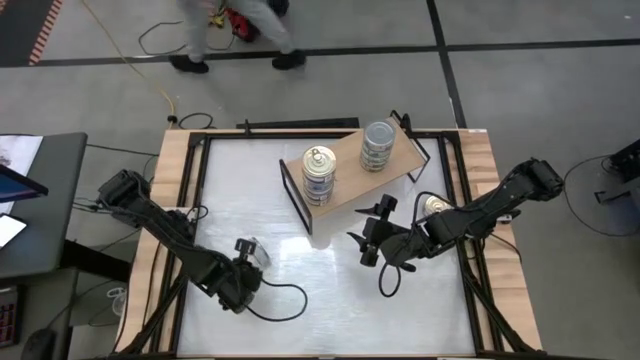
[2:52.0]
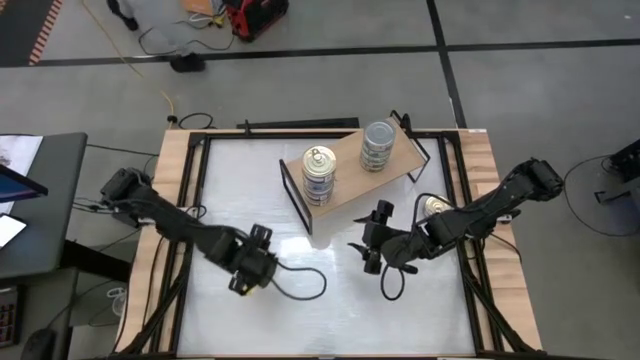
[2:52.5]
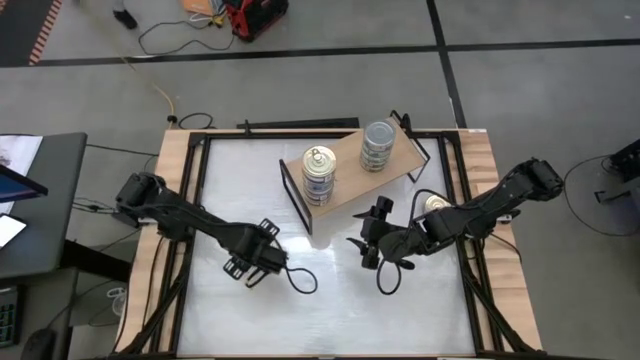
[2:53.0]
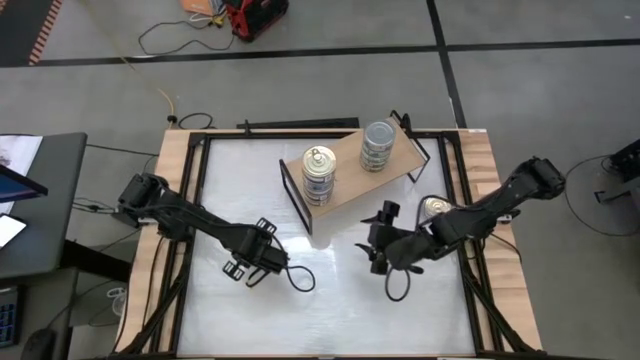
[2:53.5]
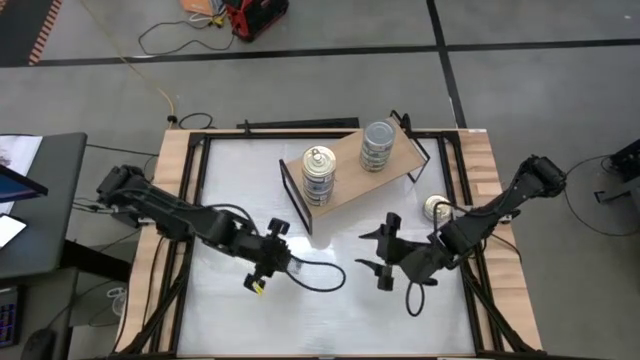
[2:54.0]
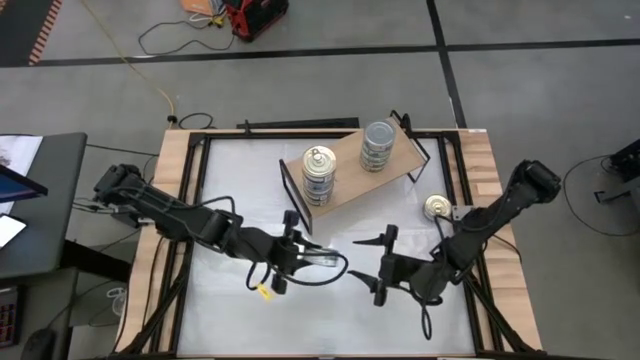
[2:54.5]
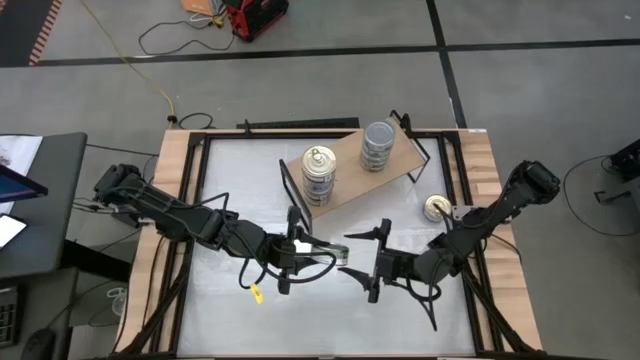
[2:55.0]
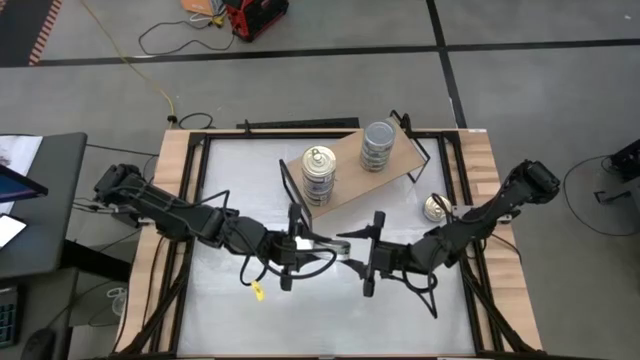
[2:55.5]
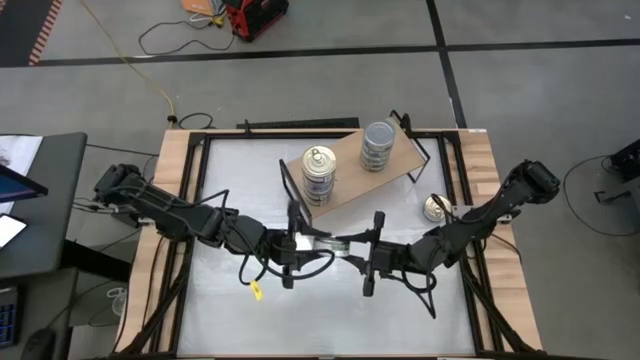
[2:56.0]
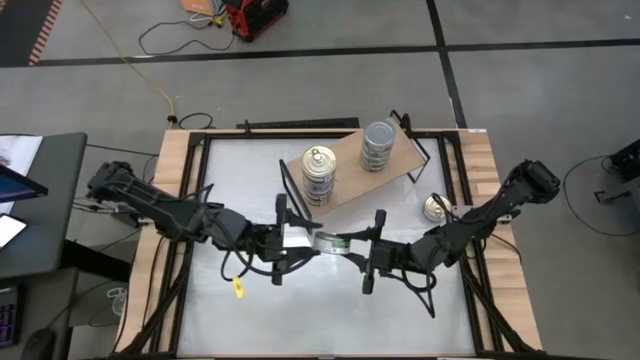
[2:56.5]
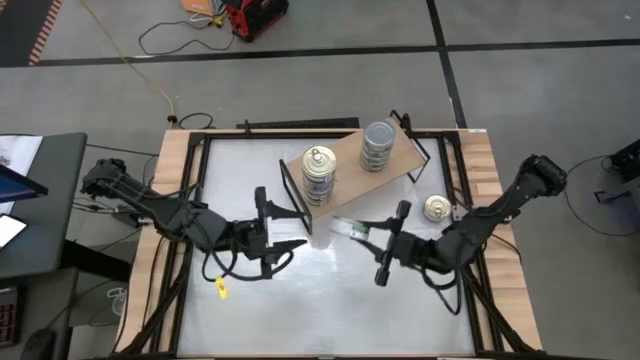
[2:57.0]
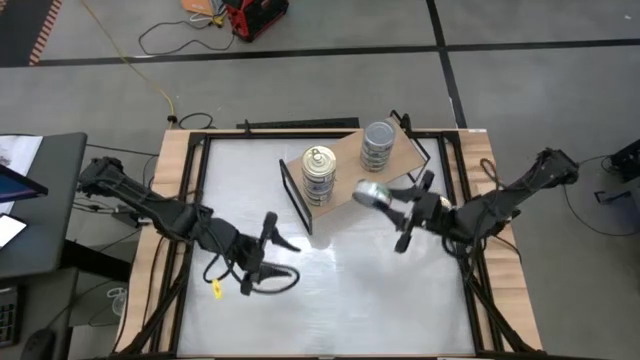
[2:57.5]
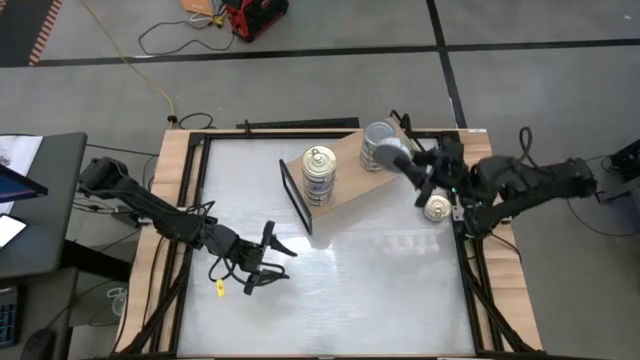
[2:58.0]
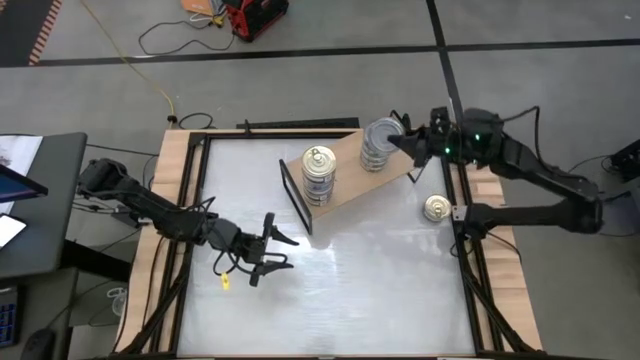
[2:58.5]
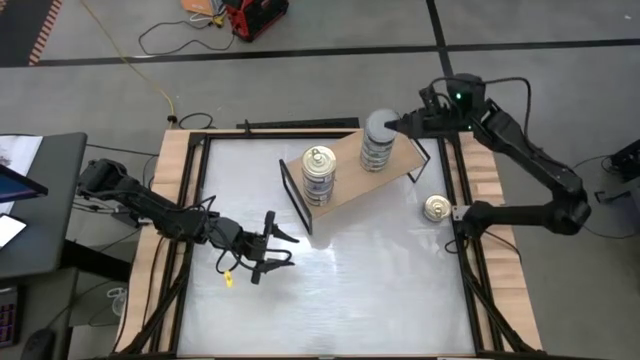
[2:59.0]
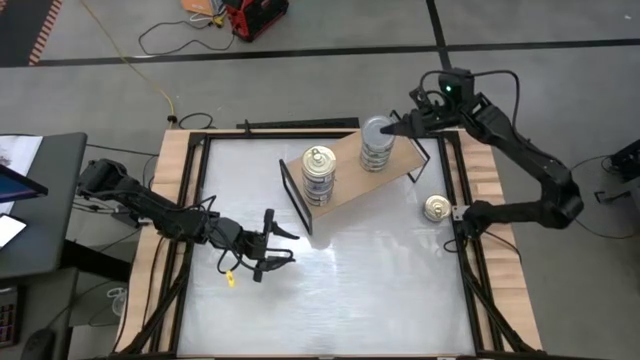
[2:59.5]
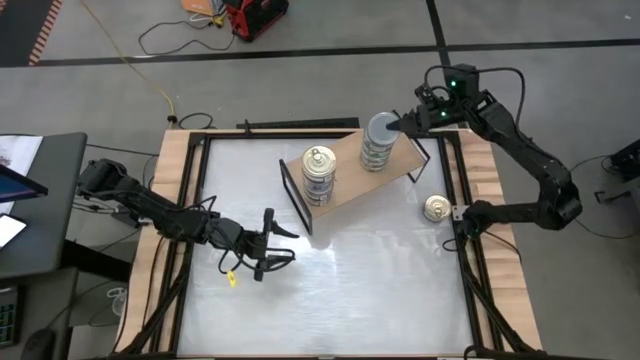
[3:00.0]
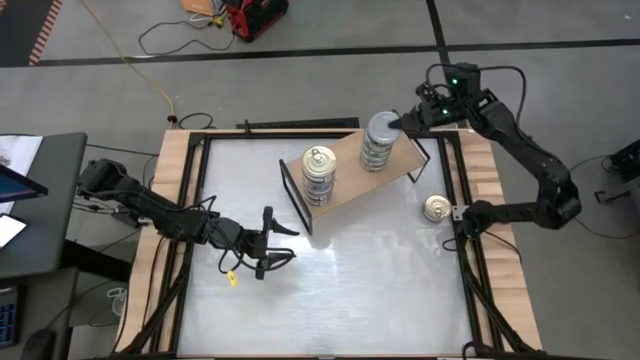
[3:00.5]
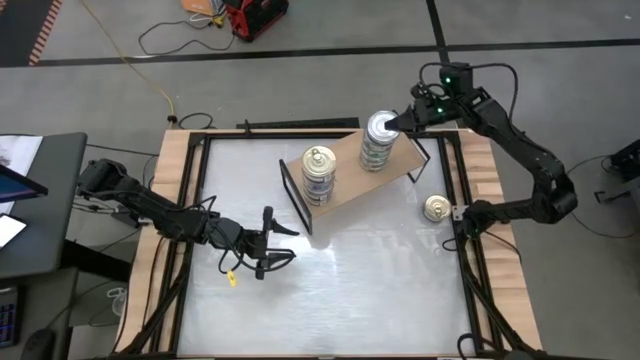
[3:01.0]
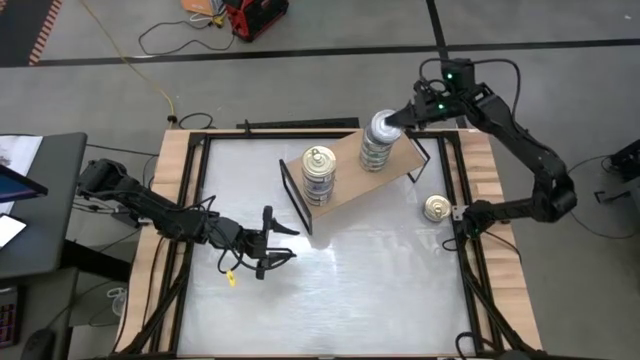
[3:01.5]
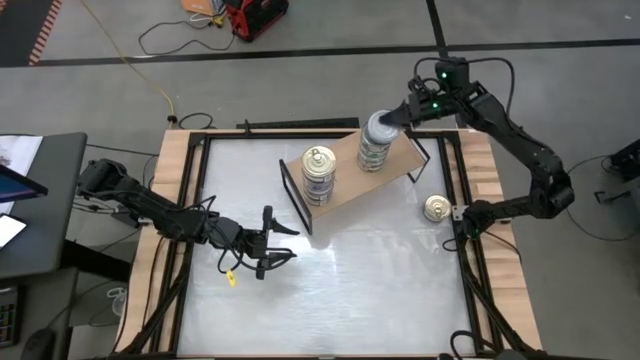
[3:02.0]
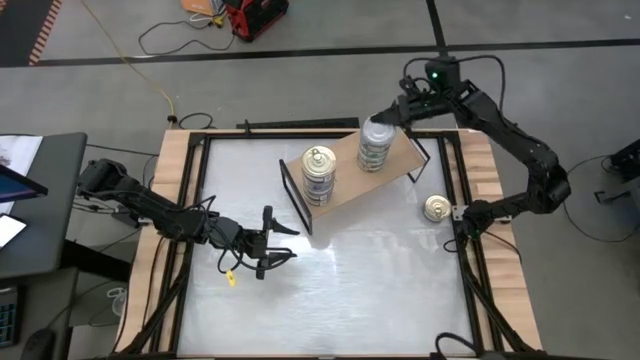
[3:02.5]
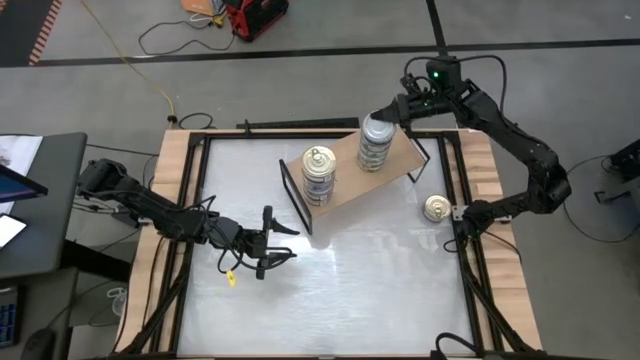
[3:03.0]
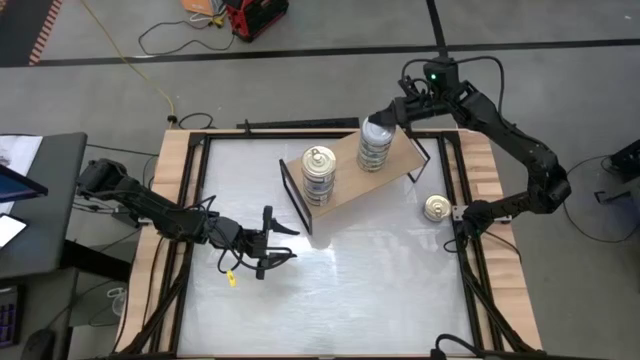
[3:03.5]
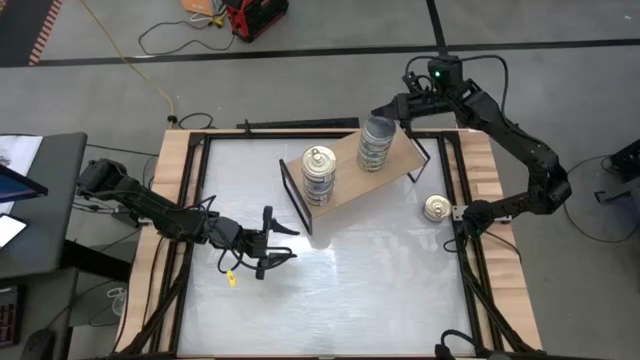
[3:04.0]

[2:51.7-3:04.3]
Task: Stack canned seafood by type on shelf
Stack the green tuna can on top of the green tuna can

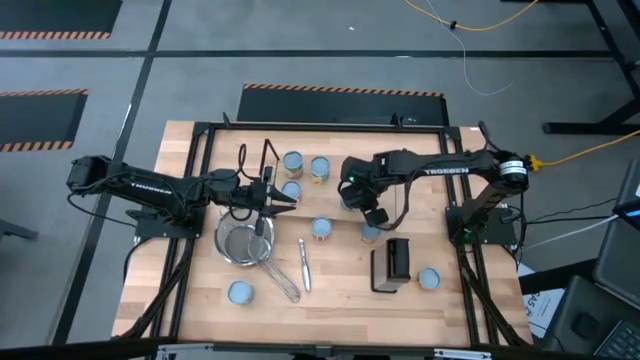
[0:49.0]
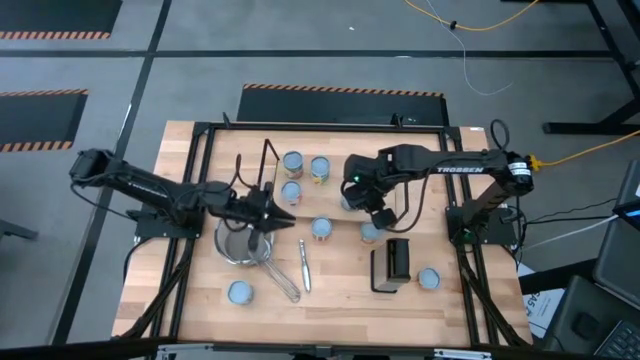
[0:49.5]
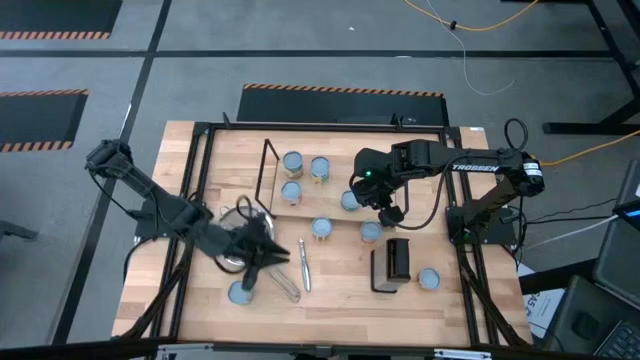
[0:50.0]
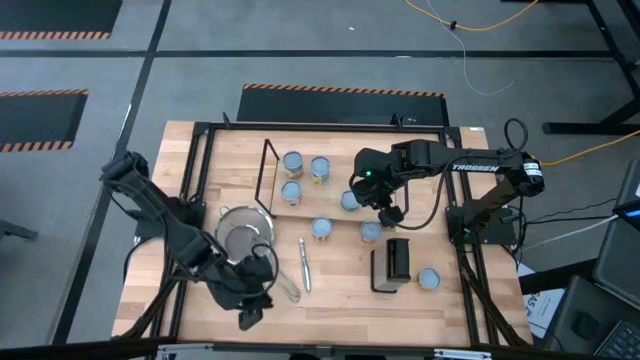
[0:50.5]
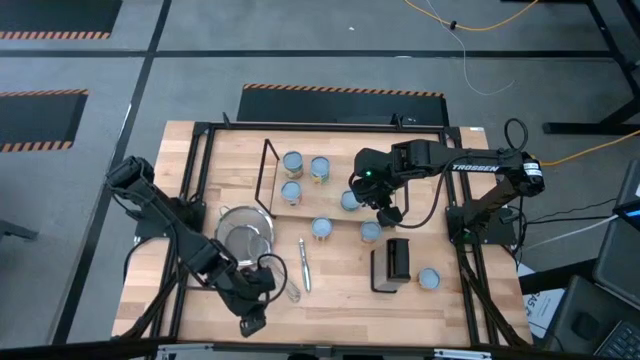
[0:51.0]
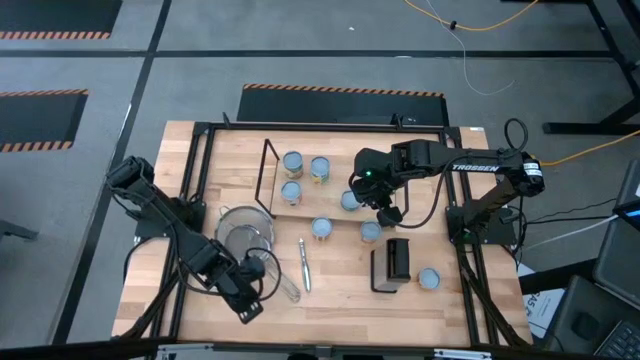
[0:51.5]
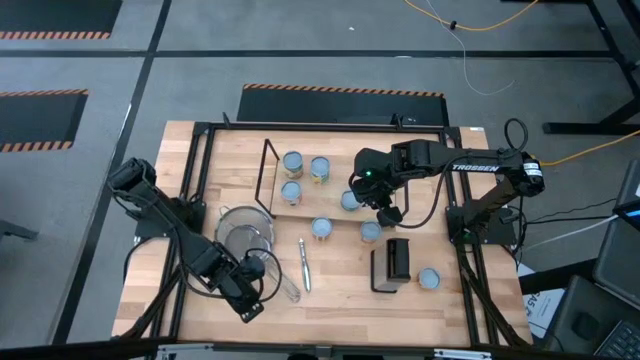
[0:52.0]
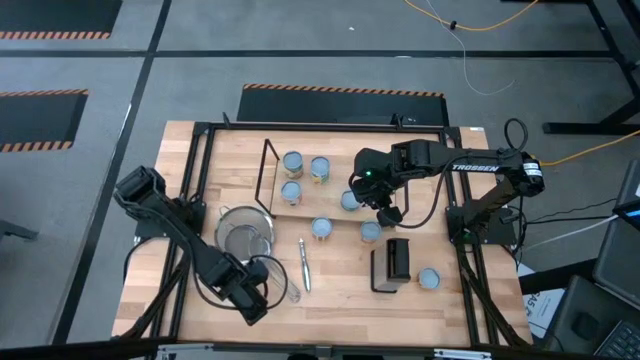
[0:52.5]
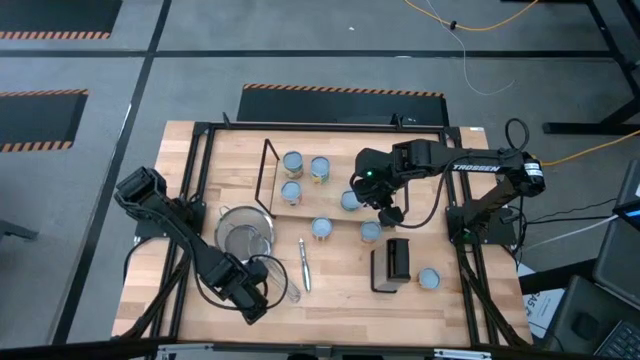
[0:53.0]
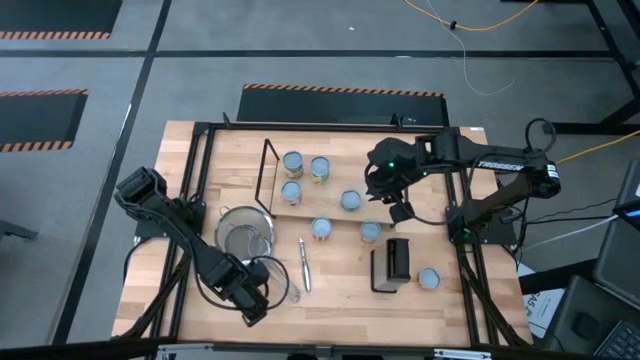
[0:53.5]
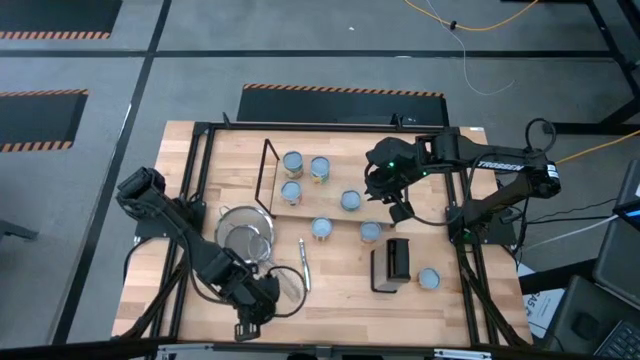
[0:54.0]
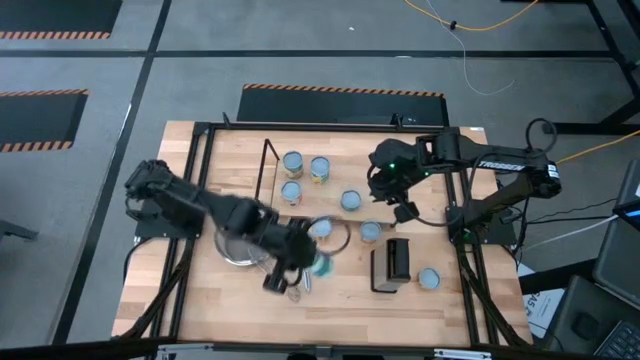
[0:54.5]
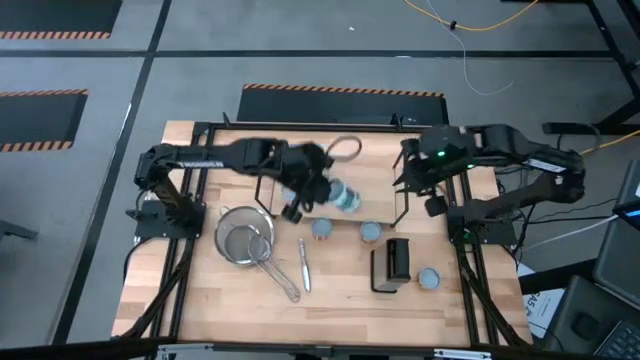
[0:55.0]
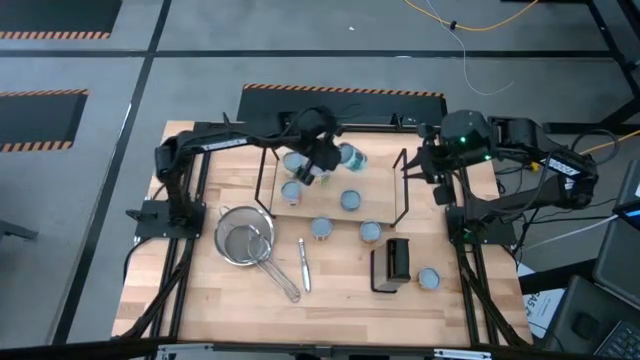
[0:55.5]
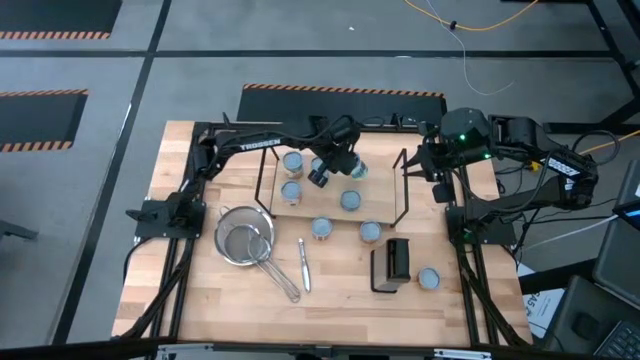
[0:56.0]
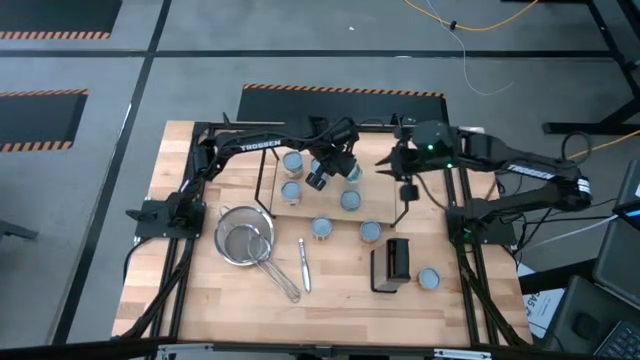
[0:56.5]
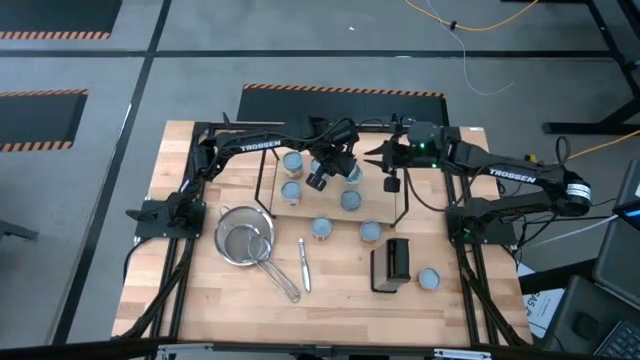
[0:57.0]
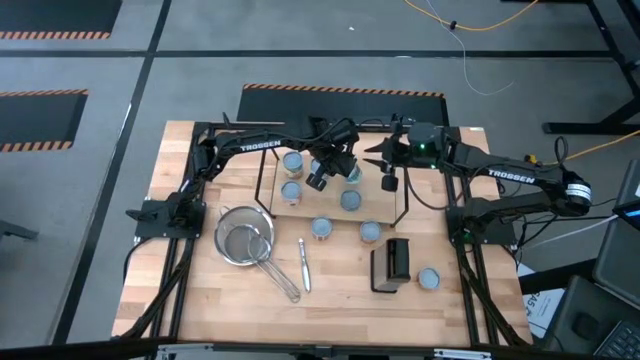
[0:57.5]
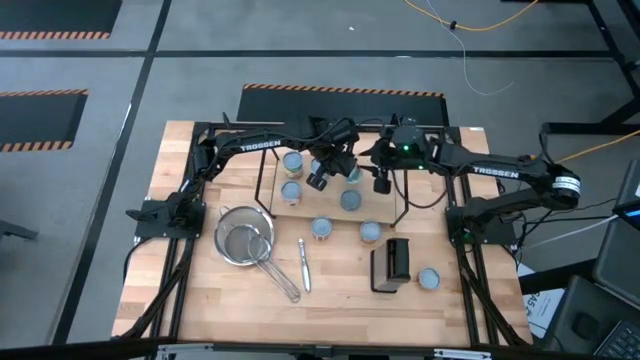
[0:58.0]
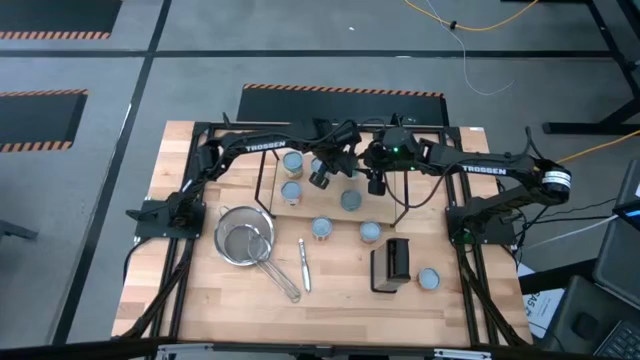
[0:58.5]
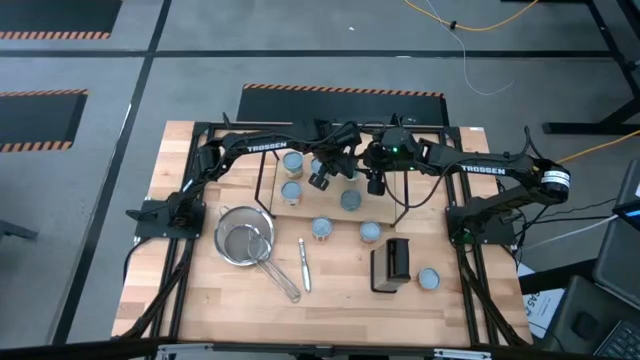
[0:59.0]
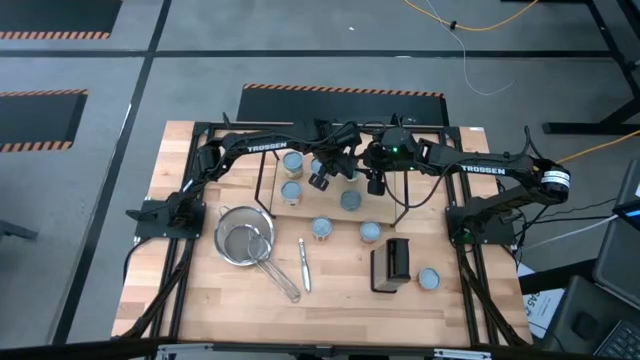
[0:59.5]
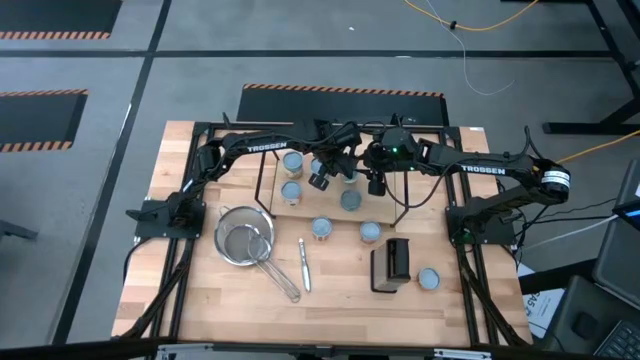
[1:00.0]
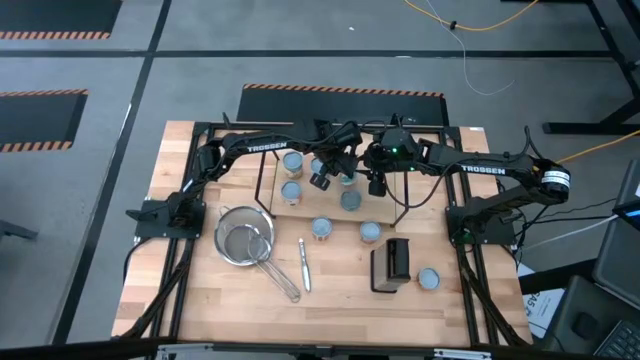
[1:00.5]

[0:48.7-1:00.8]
Task: Pick and place cans onto a shelf
Put the white can on the shelf aligned with the other blue can
